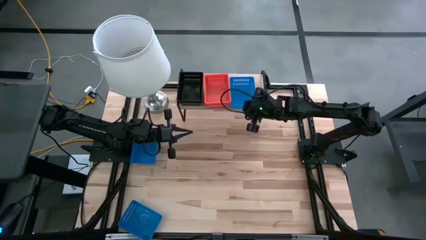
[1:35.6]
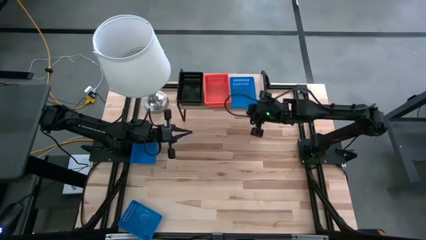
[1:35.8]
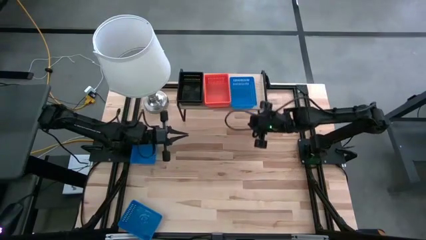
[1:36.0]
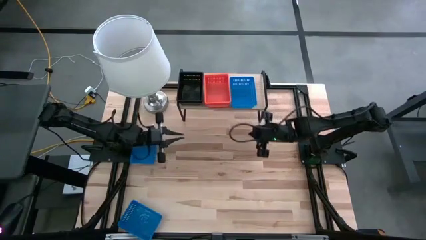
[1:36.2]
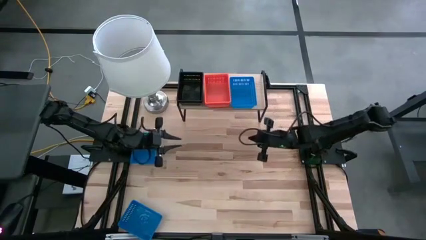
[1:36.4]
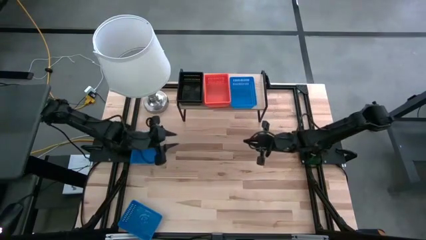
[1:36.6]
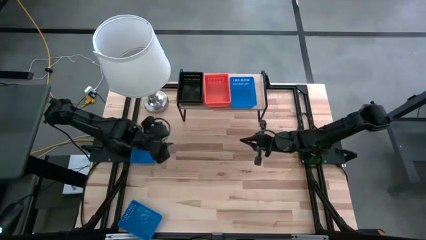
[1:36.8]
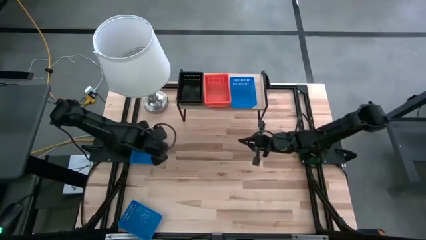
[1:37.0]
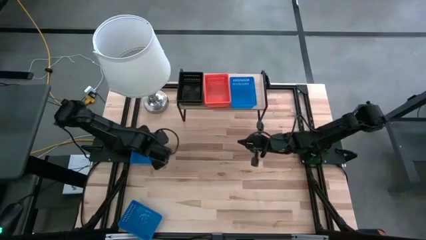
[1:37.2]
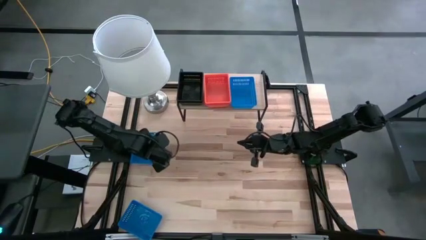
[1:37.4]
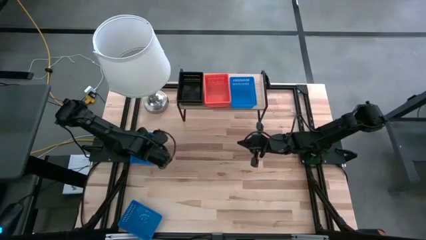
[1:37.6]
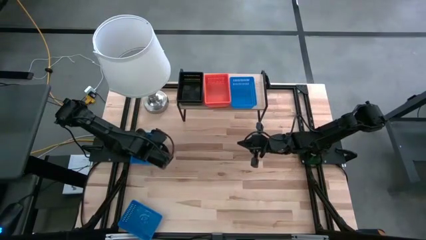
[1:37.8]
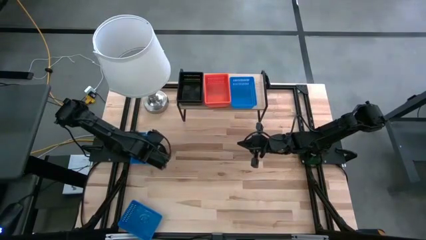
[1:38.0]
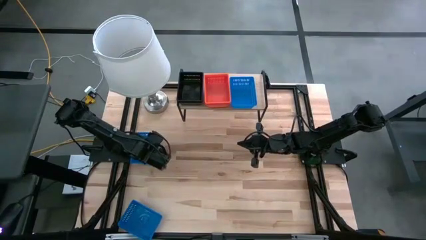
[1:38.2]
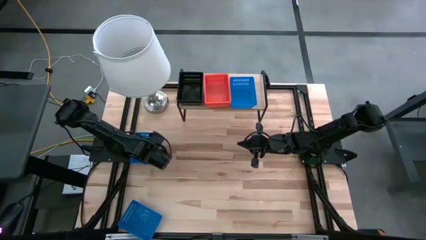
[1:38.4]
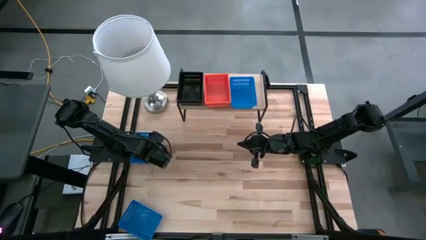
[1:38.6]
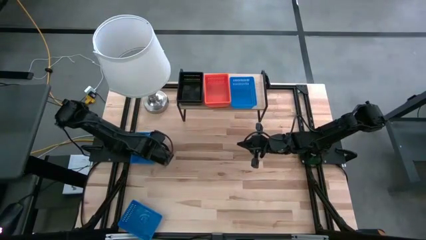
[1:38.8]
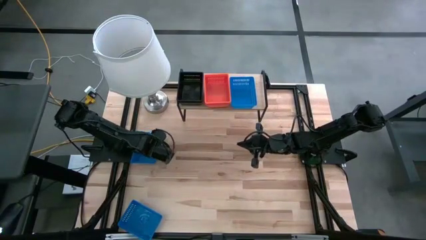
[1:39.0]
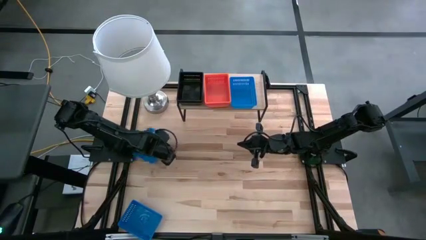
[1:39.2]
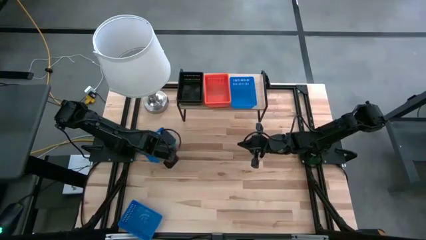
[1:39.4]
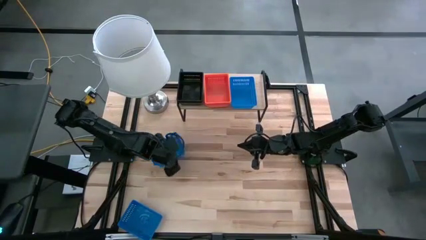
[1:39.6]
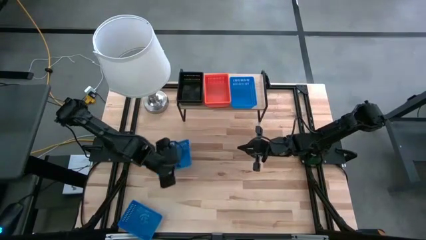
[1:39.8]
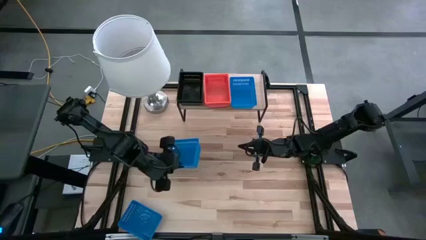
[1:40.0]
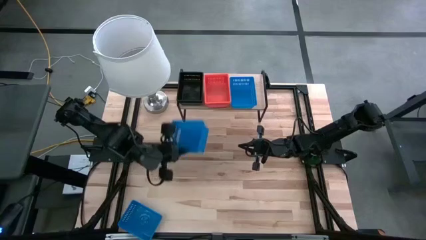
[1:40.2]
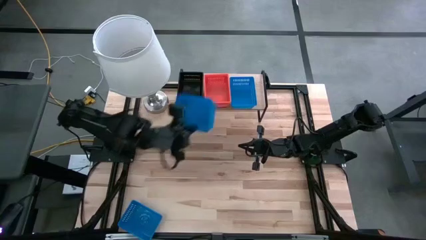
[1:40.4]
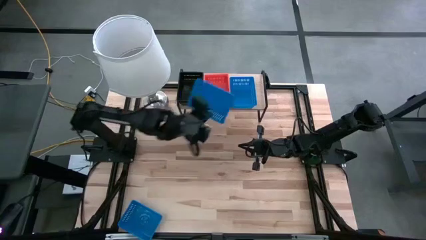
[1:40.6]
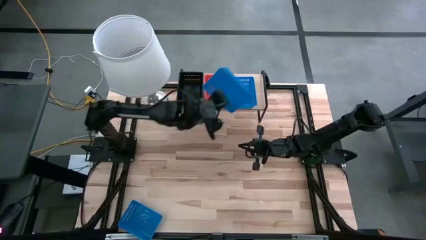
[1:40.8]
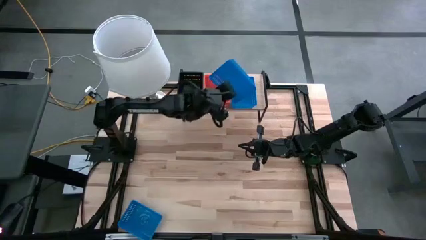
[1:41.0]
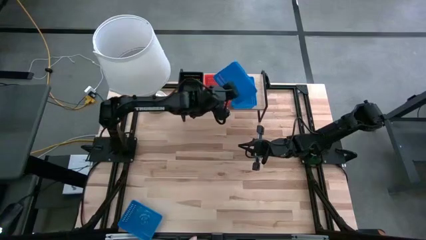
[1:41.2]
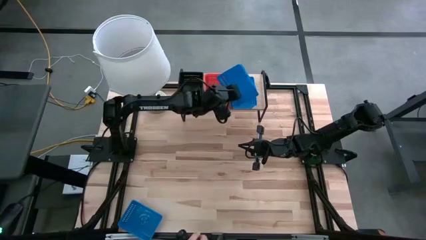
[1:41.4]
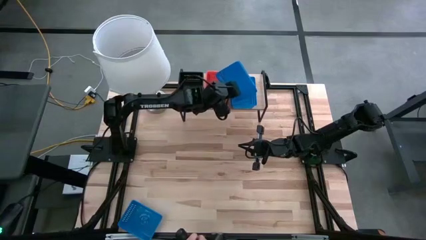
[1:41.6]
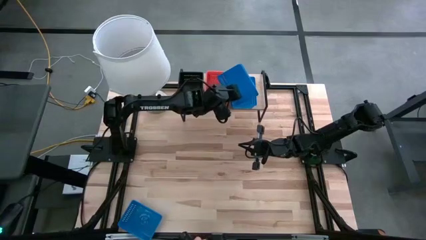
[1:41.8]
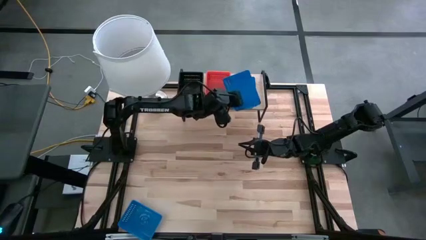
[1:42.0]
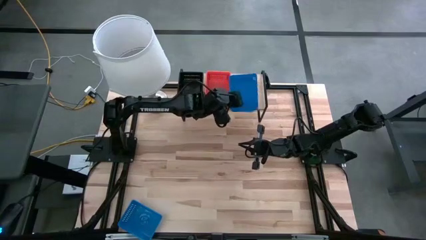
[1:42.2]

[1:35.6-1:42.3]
Task: Stack baskets on shelf by color
Stack the top blue bin on top of the blue bin on the shelf

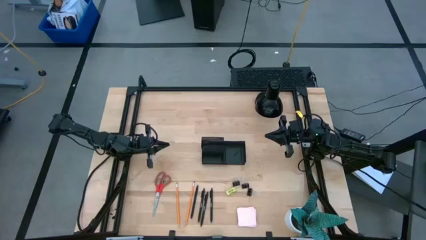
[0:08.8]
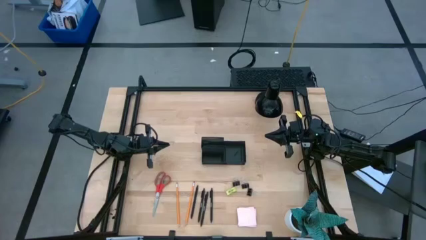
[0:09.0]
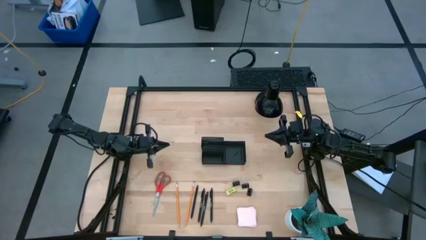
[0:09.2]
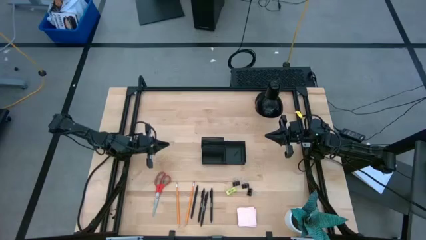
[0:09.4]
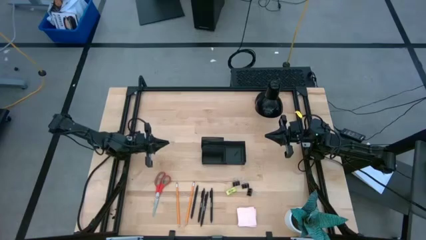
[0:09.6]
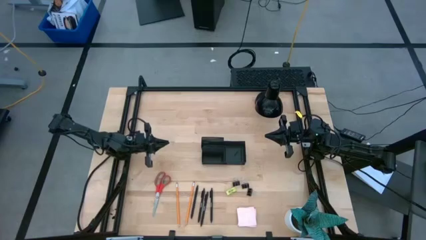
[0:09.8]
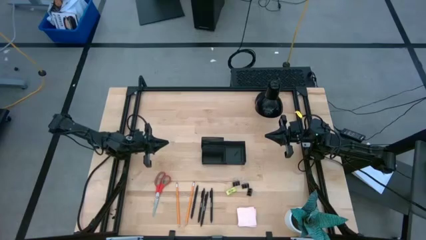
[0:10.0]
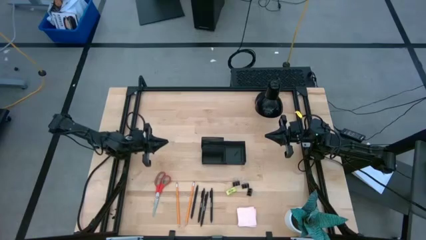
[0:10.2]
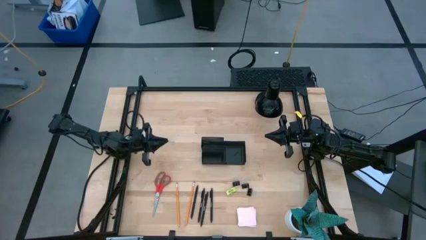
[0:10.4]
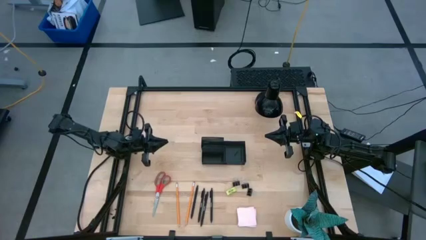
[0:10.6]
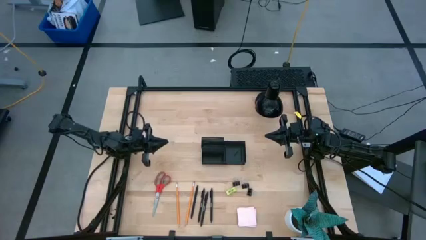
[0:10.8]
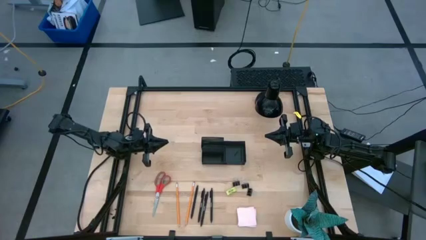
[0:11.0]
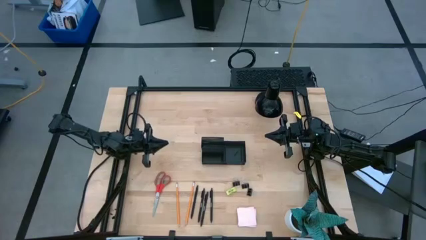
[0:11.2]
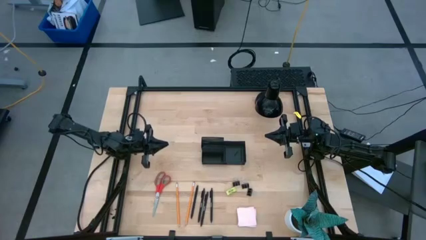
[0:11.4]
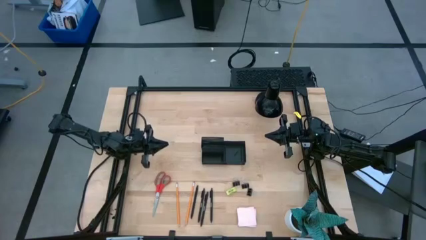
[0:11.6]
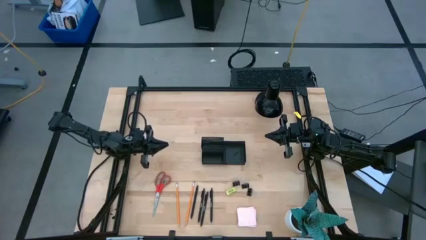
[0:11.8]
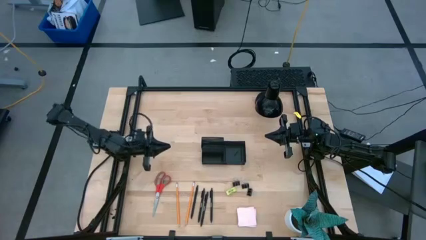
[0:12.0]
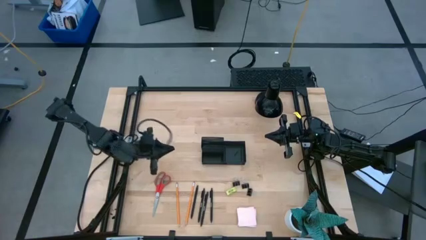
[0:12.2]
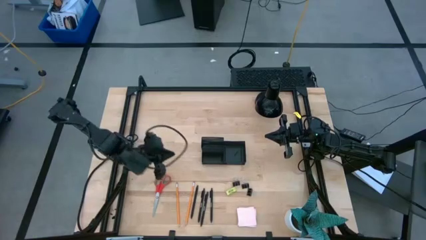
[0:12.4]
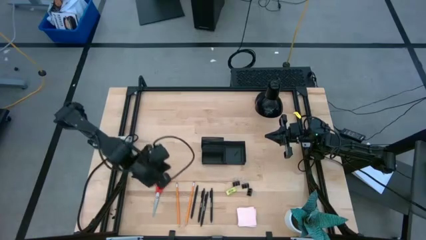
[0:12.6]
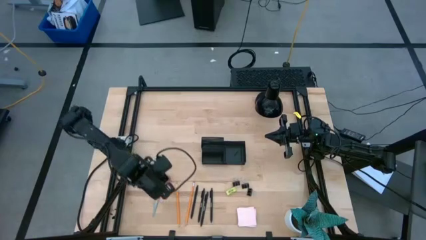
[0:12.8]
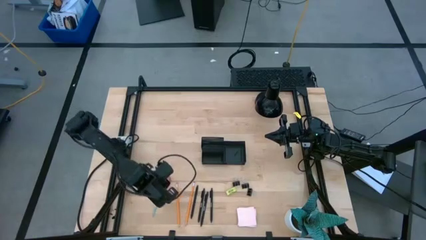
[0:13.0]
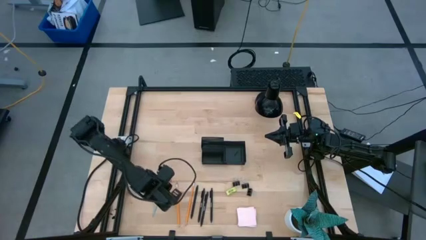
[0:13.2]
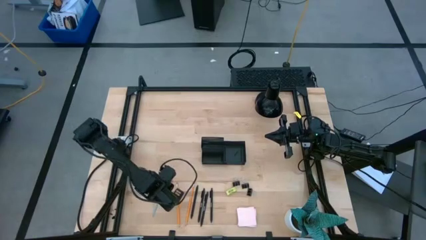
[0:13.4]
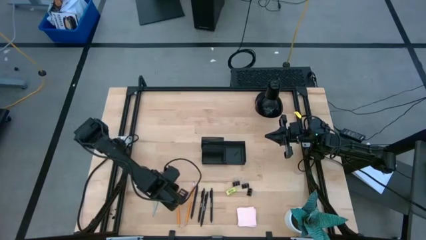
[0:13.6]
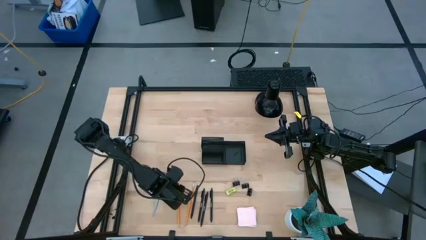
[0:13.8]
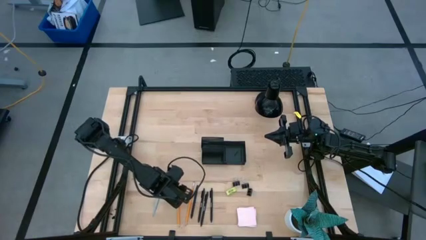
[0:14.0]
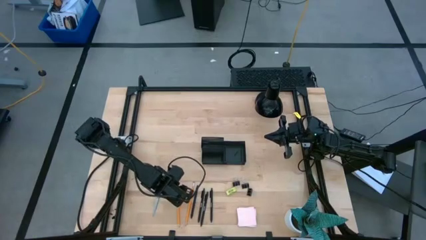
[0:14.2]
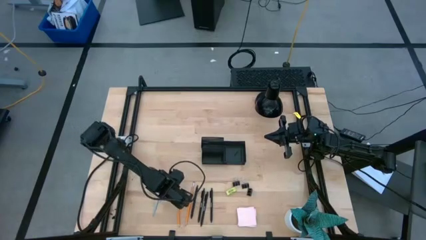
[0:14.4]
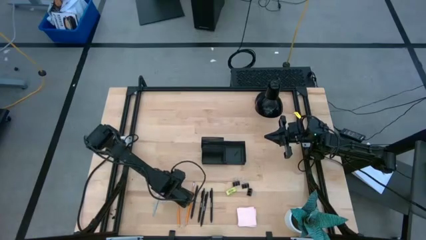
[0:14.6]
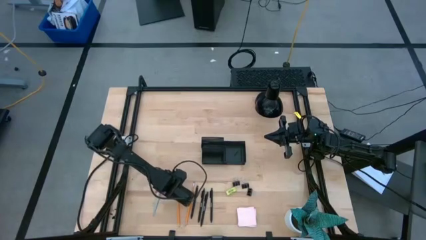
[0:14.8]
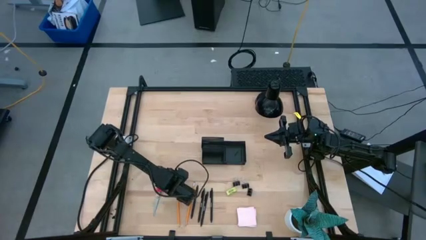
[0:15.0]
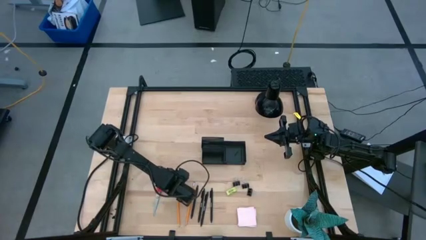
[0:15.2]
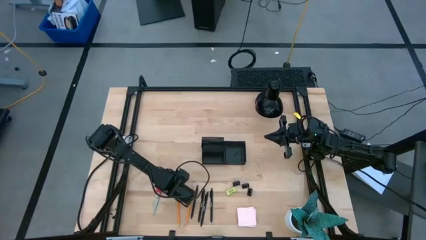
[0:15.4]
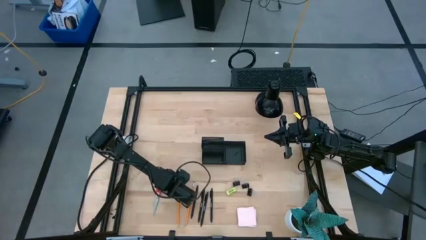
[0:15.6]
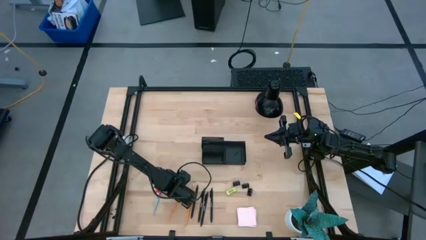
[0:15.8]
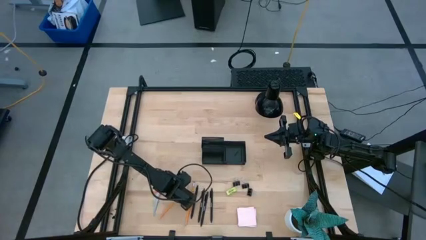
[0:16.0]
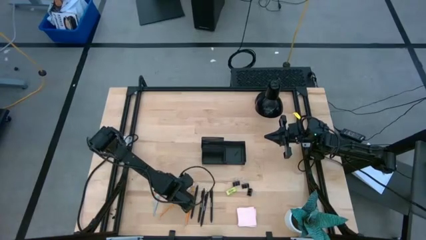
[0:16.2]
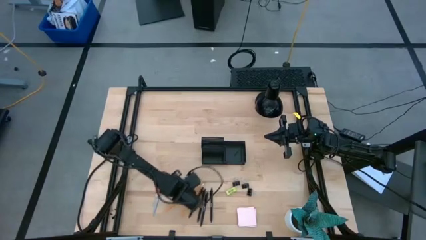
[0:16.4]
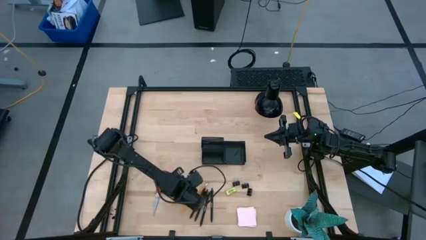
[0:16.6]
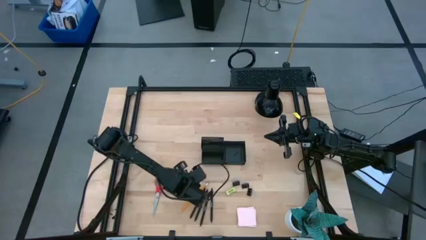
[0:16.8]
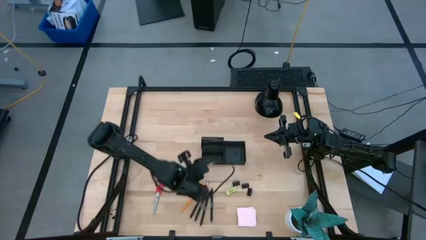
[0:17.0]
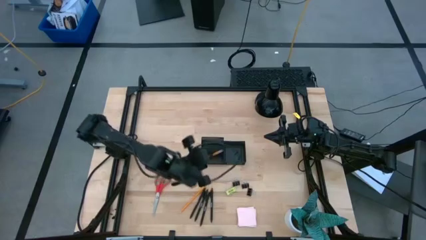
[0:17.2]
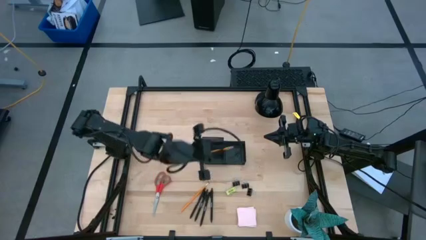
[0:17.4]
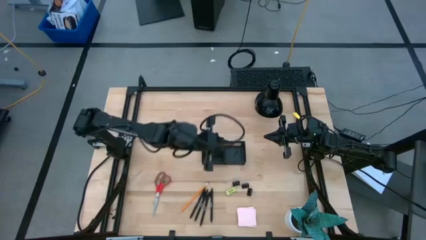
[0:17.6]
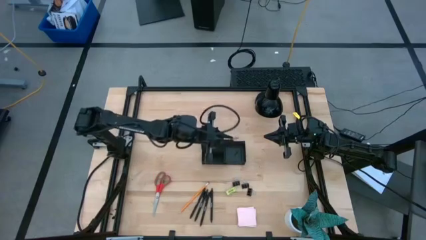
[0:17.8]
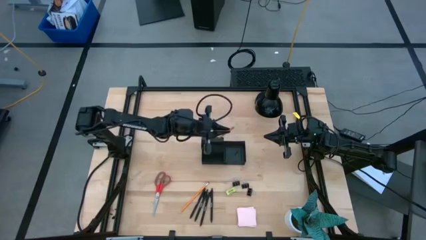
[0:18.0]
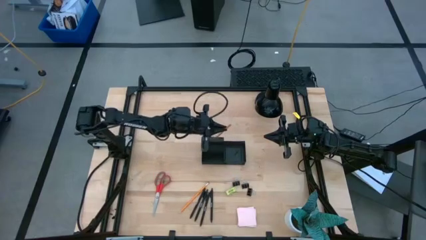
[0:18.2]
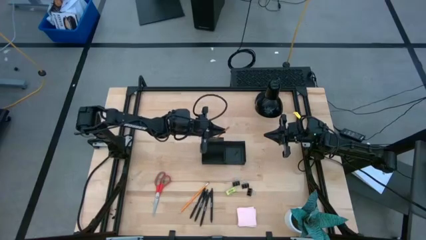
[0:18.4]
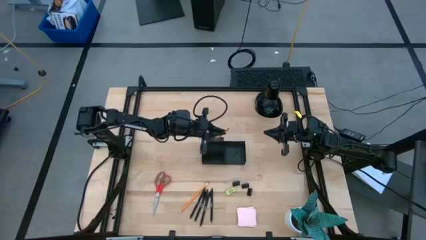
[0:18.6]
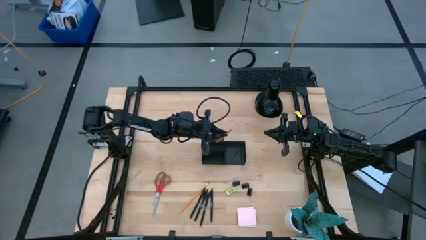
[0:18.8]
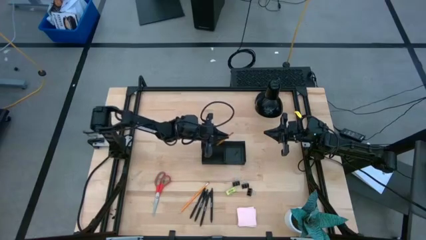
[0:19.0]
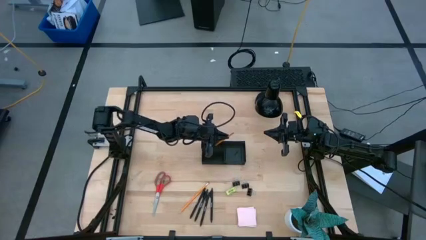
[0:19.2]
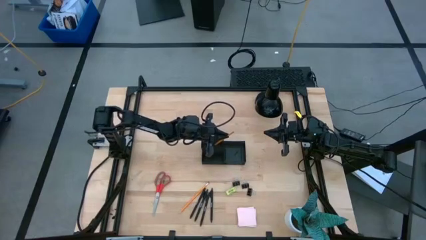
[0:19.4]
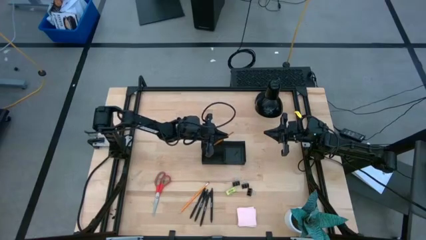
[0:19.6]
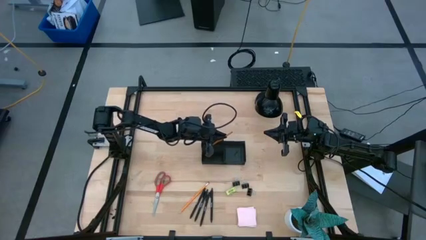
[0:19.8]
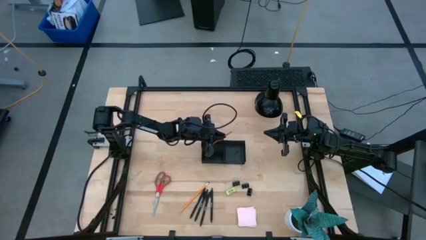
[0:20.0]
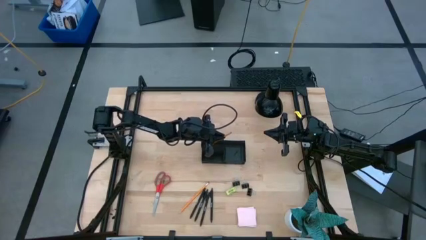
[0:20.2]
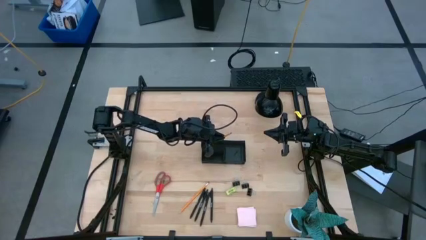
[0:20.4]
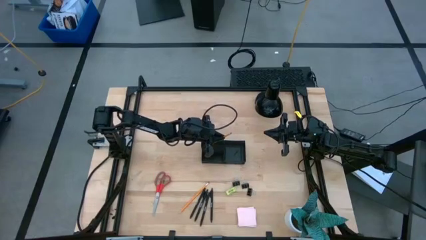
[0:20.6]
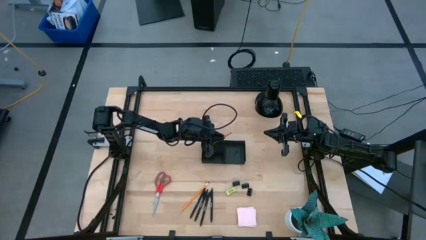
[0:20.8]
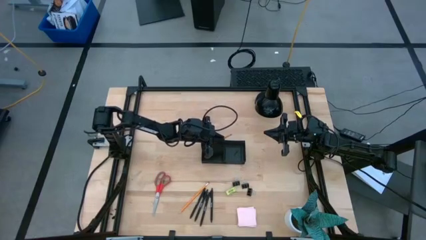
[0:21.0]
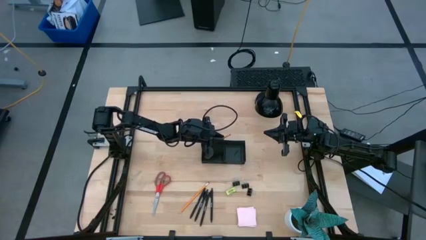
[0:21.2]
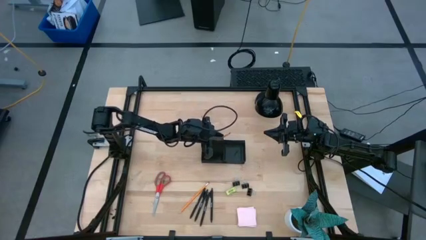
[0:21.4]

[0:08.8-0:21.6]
Task: Pick and place office supplies into organizer
Put the yellow pencil into the black desk organizer
